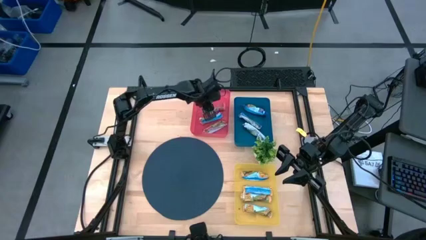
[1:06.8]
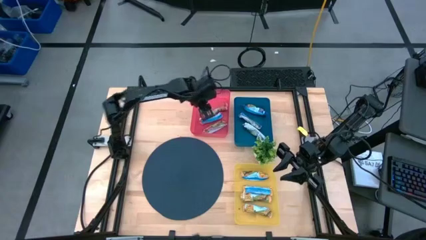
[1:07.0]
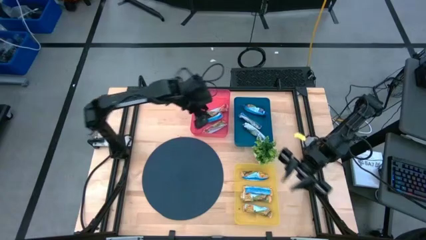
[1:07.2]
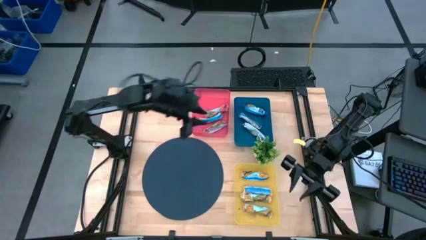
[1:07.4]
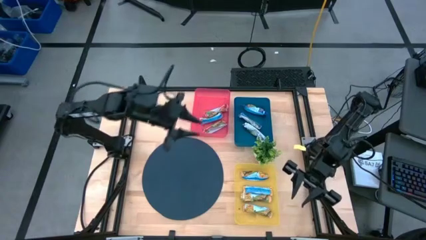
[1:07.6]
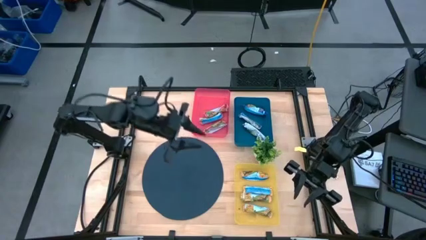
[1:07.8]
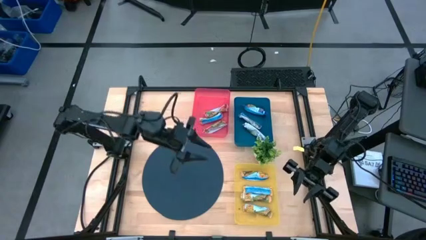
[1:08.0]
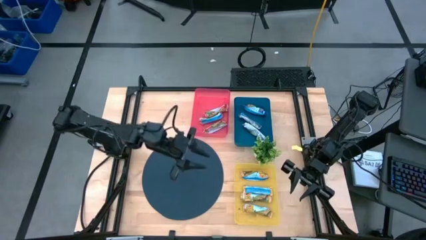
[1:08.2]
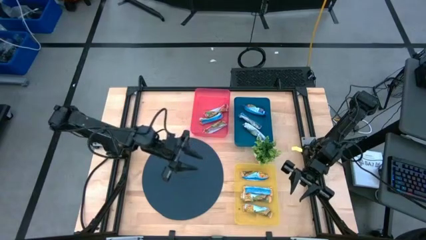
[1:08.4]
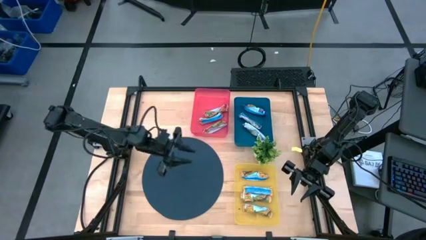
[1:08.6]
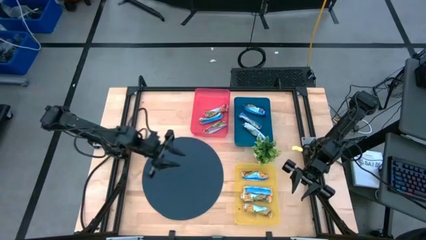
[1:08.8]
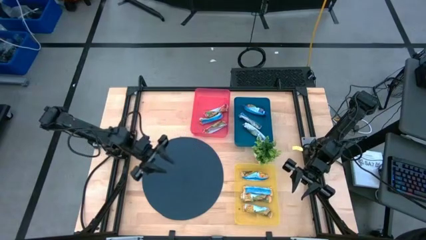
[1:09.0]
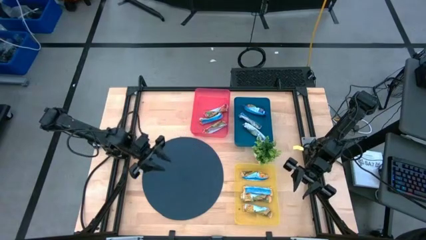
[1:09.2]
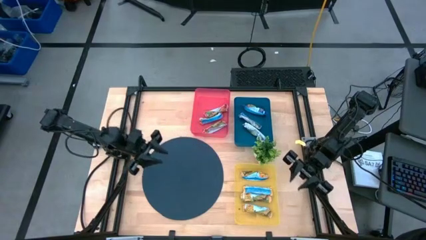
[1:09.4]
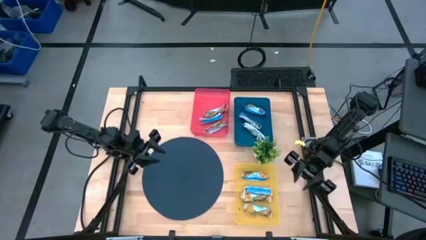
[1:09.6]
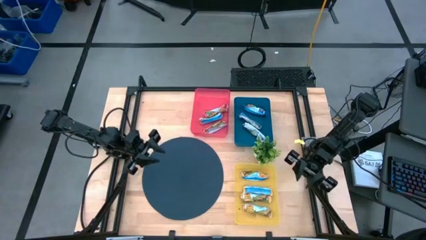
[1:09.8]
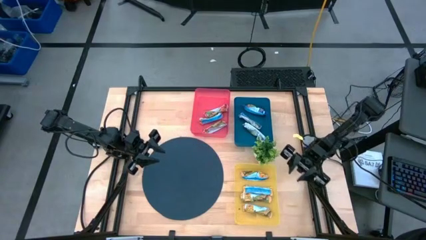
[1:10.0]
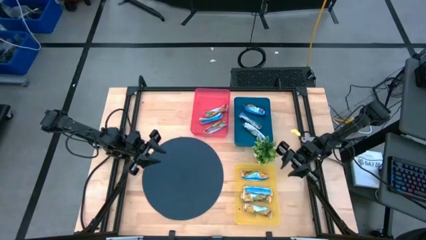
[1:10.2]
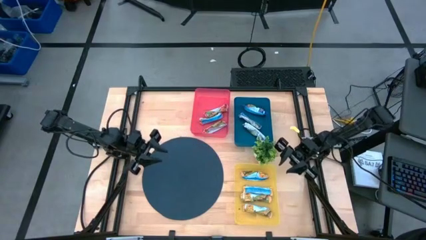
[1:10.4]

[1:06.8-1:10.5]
Task: Pick and place Granola Bars by type
Return to Home Position

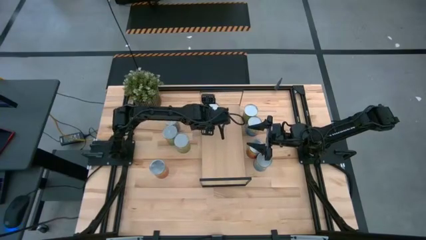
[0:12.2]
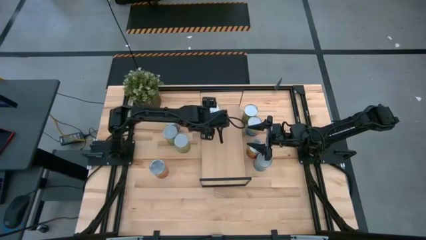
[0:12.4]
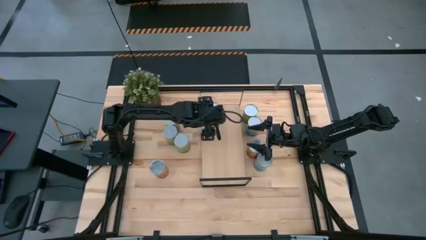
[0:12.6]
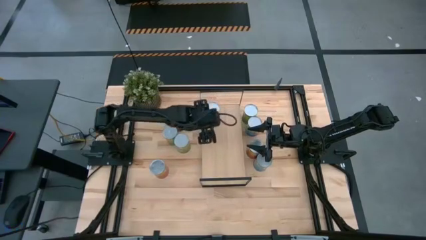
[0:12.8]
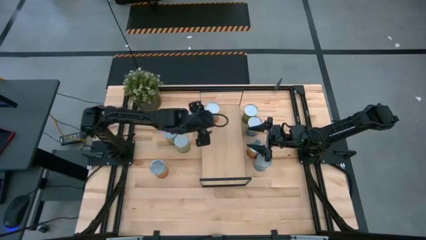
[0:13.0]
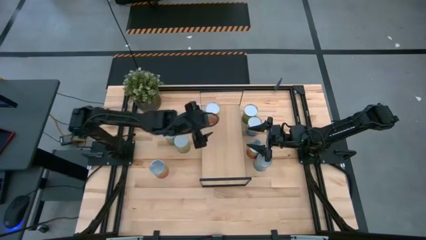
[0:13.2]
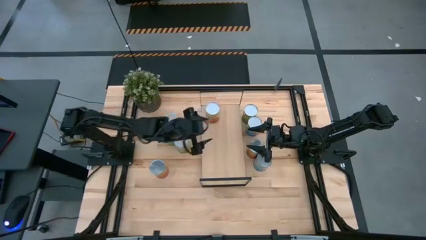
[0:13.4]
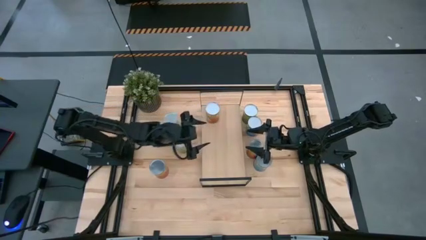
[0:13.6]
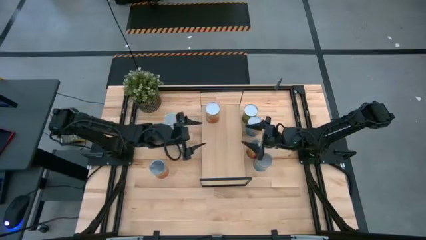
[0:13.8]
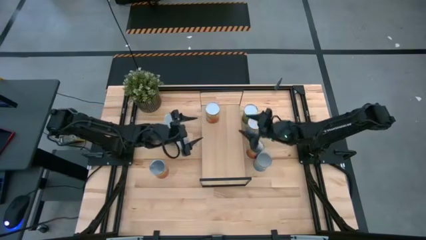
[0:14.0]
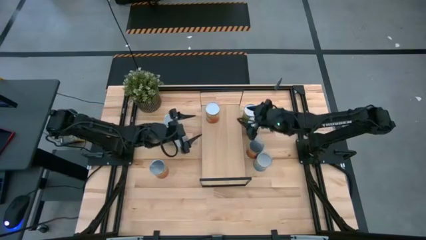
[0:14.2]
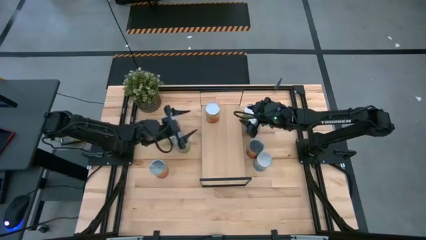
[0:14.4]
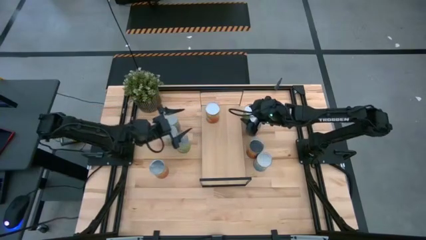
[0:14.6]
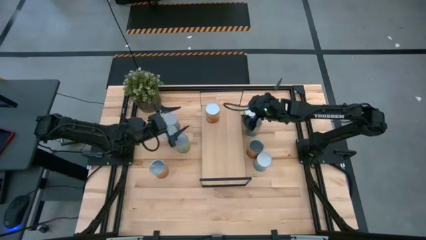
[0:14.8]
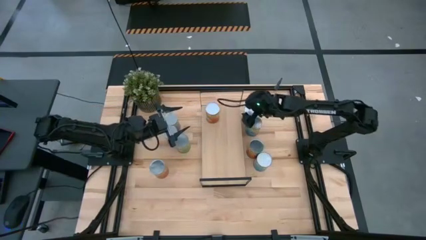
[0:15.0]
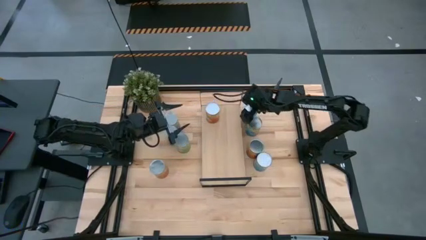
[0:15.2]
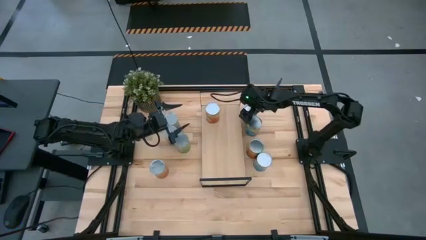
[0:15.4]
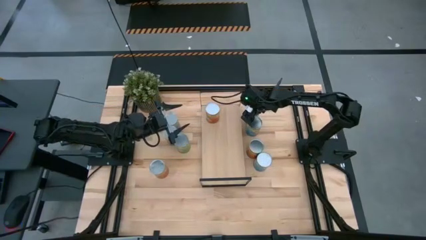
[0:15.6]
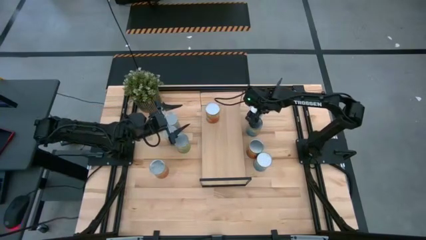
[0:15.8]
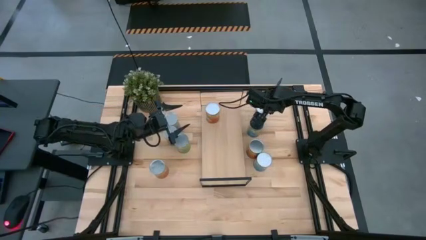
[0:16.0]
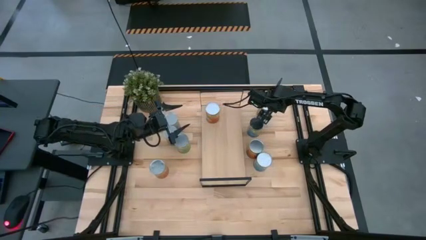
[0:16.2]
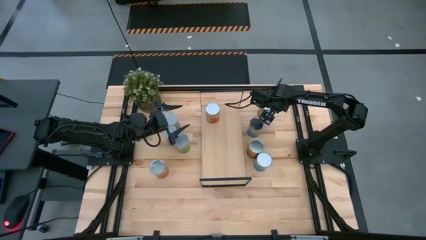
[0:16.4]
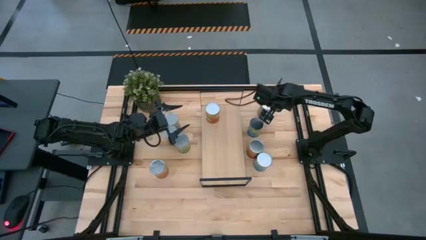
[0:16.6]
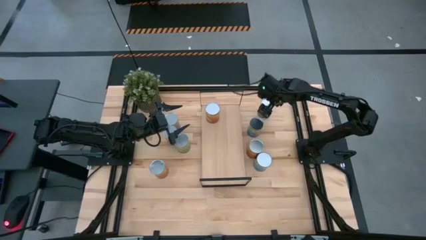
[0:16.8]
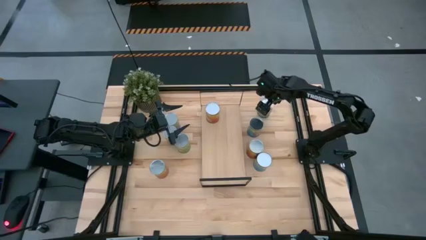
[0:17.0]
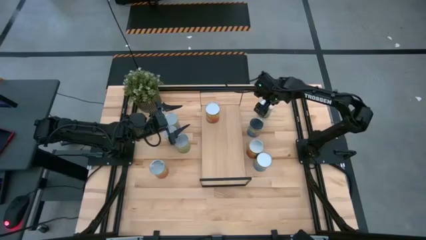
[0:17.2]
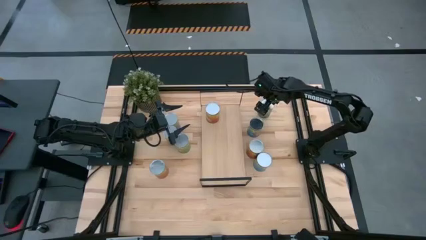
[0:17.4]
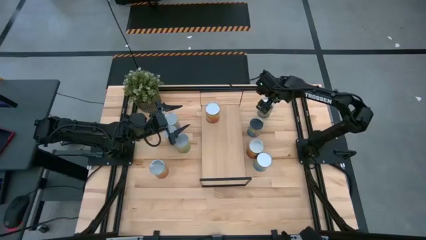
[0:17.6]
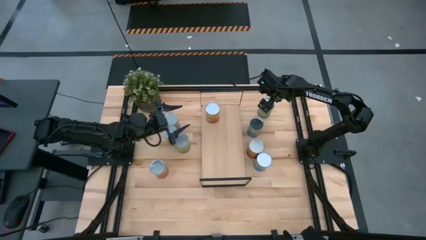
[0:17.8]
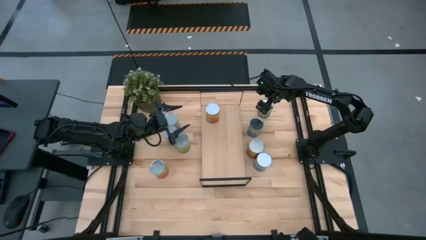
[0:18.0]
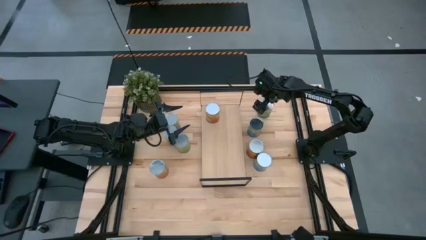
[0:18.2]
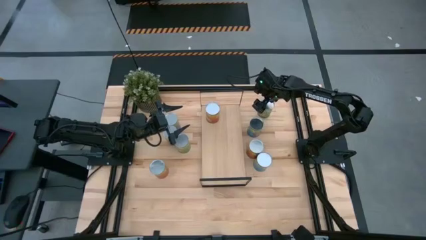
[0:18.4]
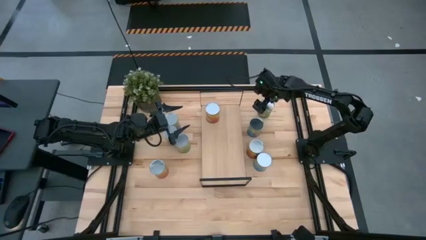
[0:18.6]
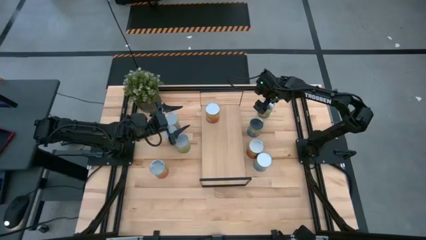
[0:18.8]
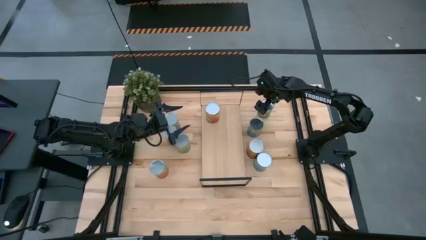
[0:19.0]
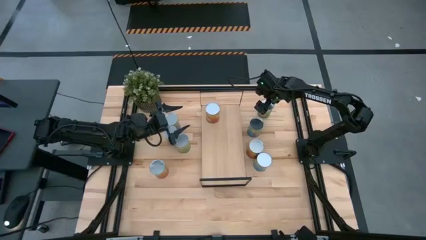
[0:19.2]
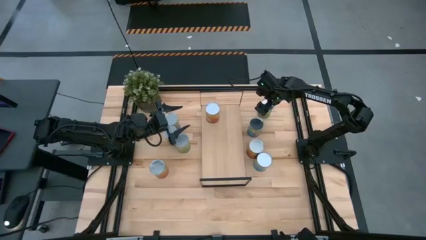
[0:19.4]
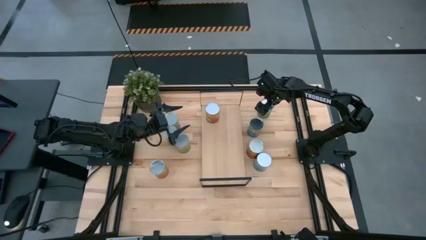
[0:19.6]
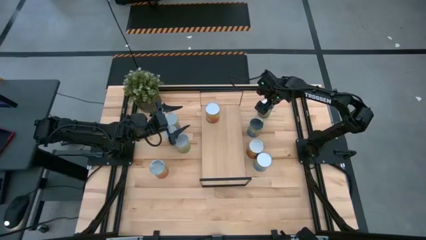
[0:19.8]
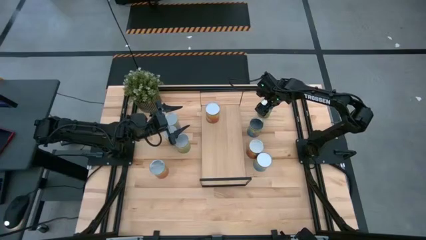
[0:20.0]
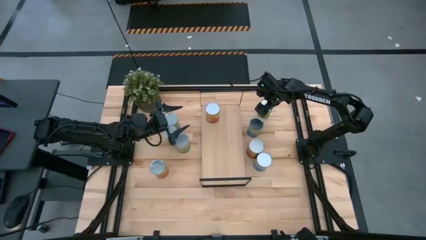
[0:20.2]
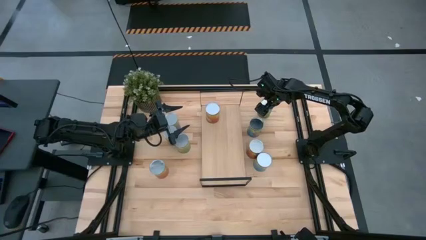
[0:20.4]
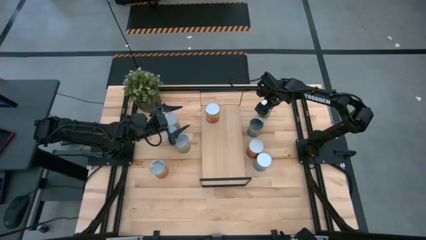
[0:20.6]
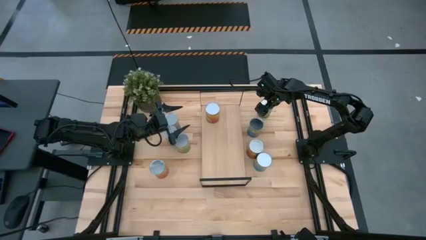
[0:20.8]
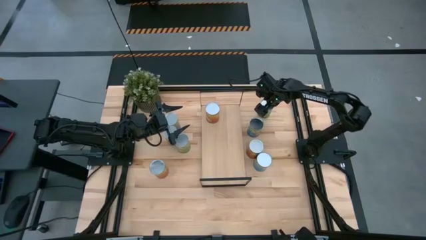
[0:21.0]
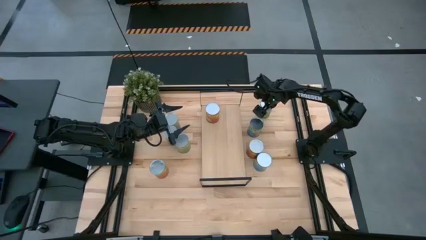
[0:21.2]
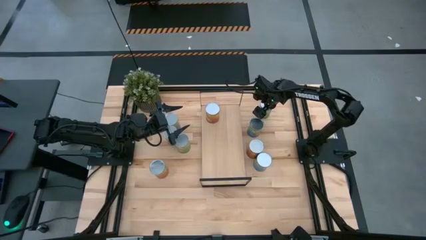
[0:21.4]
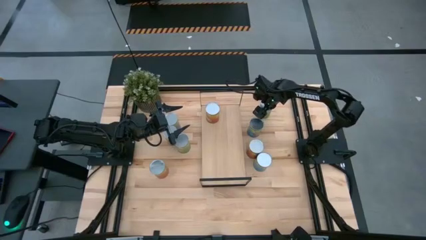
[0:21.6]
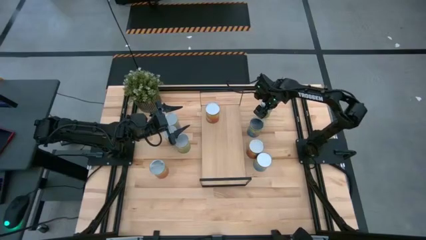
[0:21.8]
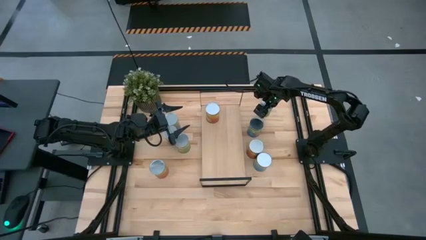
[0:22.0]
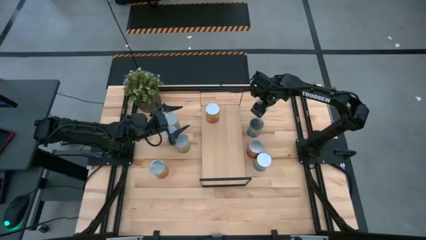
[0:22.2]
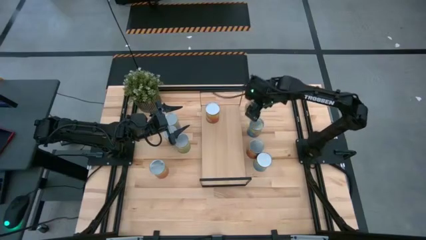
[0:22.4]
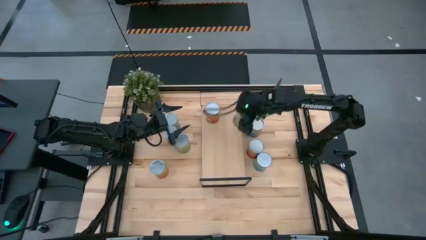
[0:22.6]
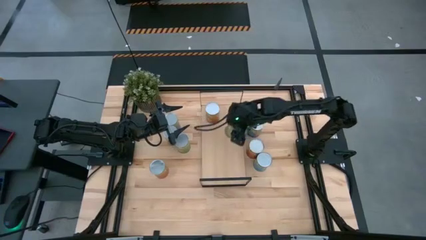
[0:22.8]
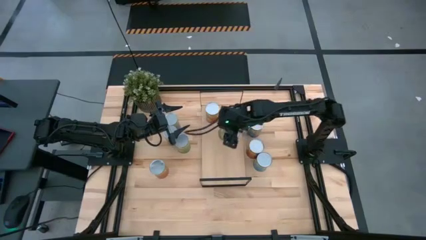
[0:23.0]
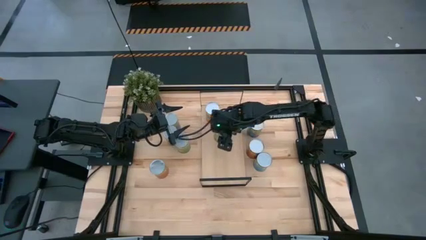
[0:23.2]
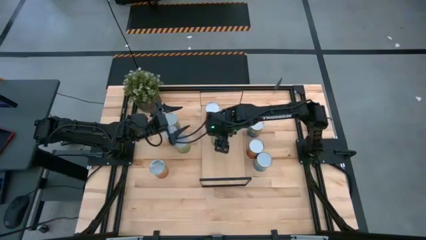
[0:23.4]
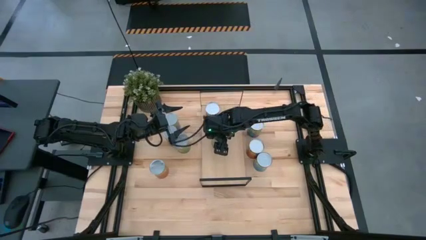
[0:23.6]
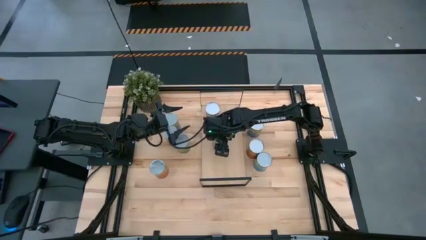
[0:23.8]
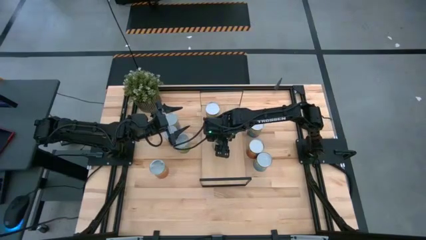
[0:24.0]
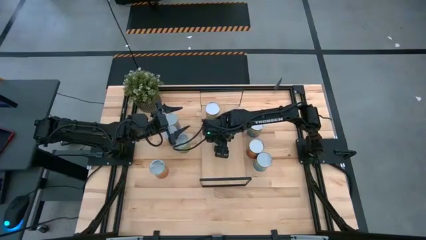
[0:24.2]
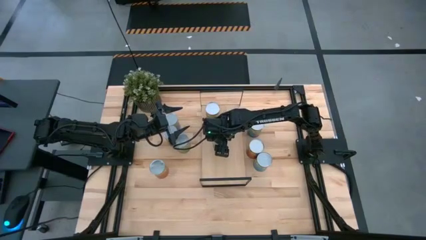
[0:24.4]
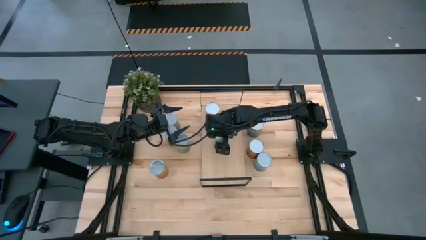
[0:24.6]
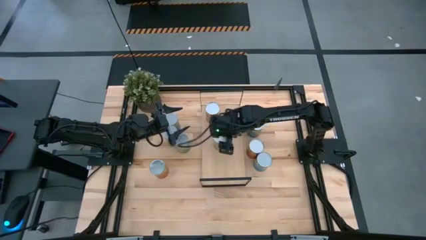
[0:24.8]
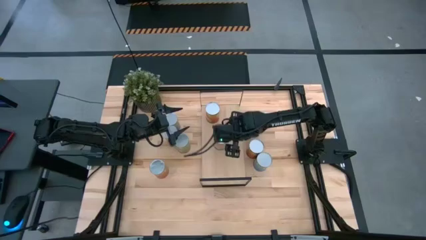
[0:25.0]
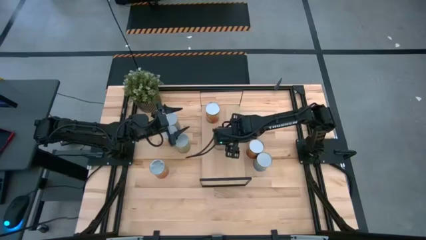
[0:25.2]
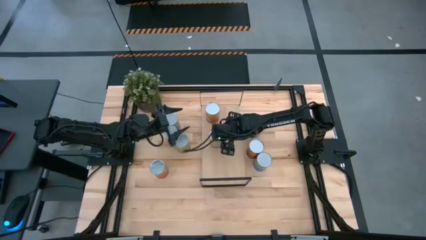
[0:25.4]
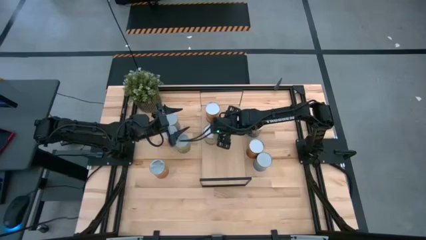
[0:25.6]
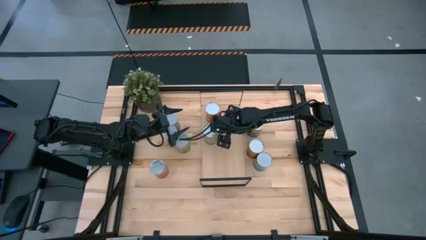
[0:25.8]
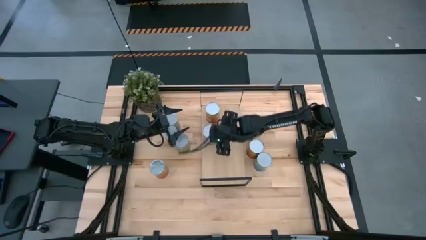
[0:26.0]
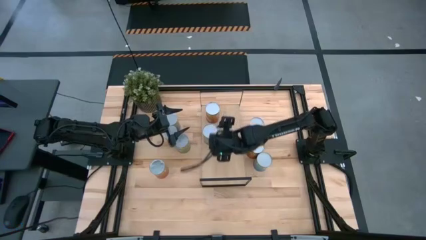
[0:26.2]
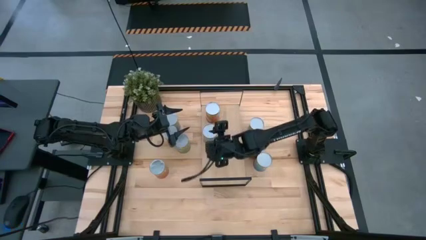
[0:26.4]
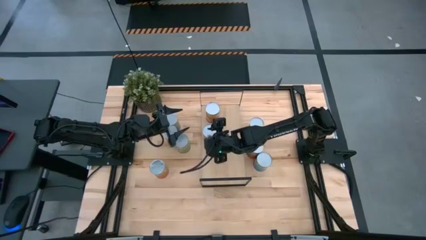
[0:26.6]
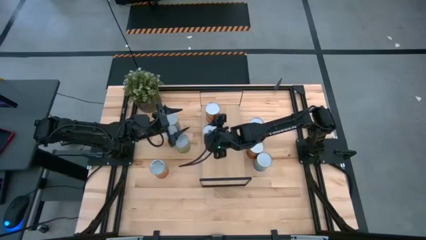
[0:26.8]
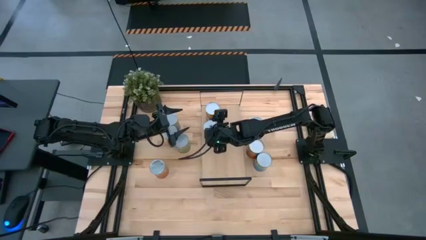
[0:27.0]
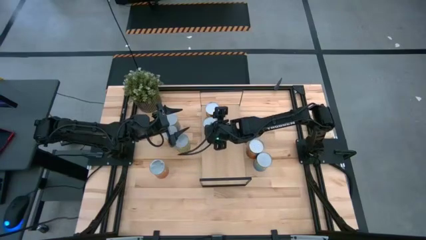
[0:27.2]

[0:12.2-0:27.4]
Task: Pick and place cans onto a shelf
Put the top canned oranges on the shelf
